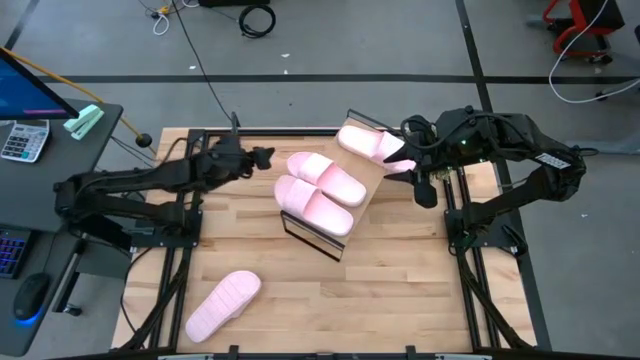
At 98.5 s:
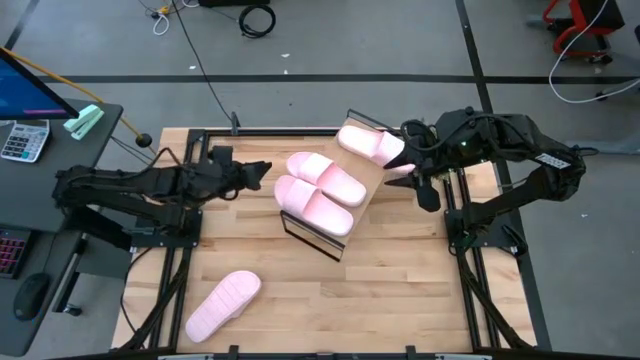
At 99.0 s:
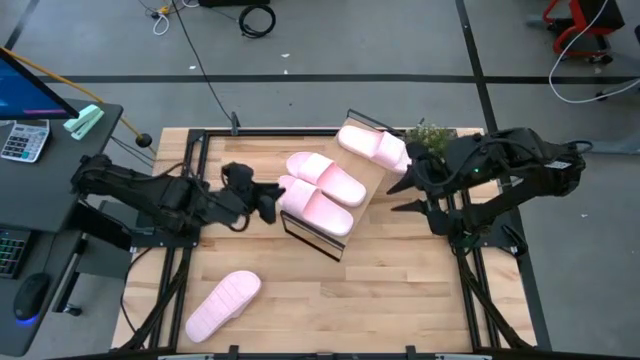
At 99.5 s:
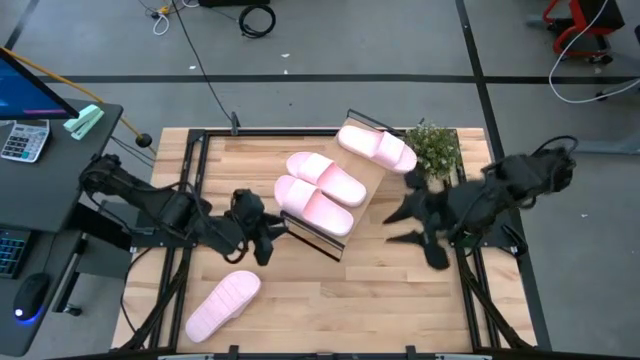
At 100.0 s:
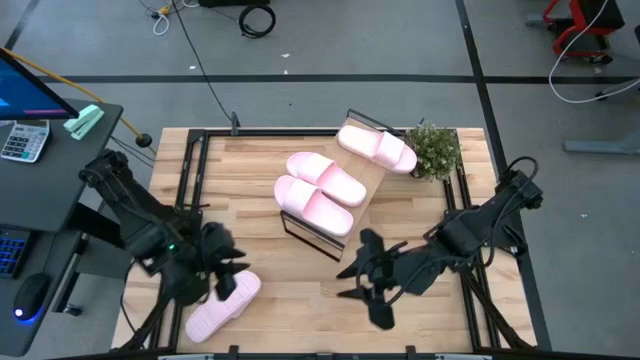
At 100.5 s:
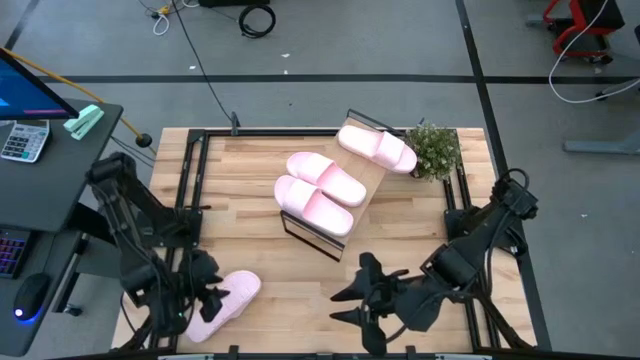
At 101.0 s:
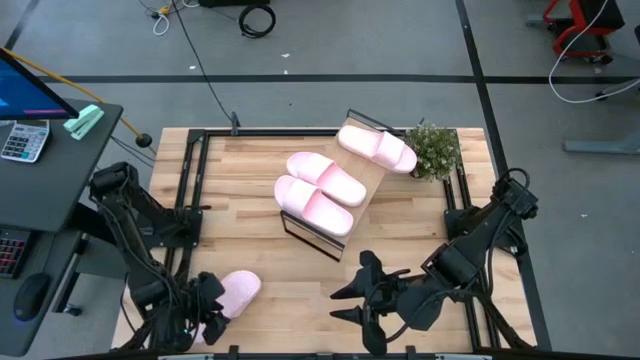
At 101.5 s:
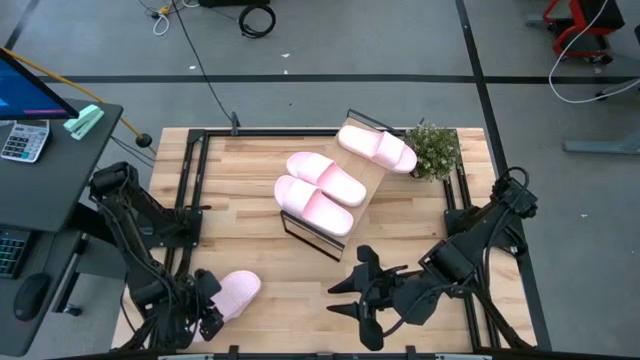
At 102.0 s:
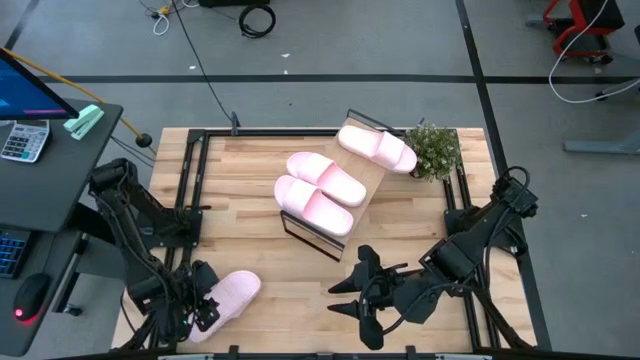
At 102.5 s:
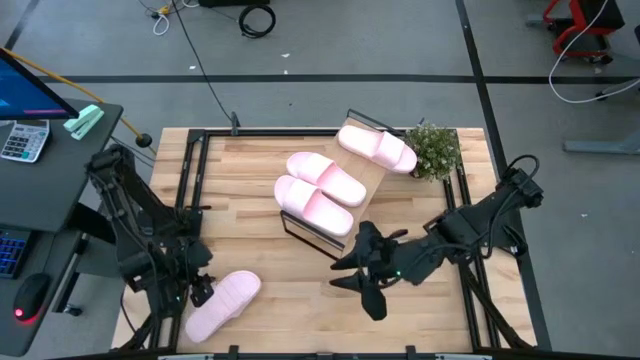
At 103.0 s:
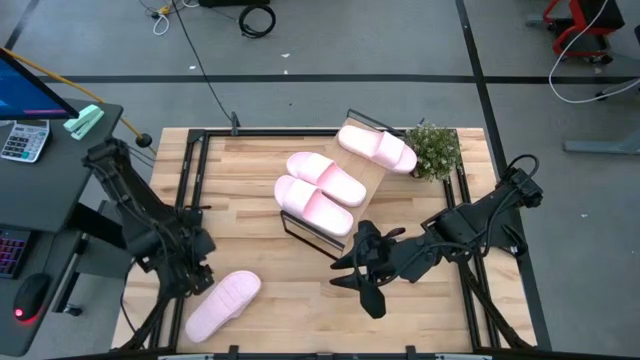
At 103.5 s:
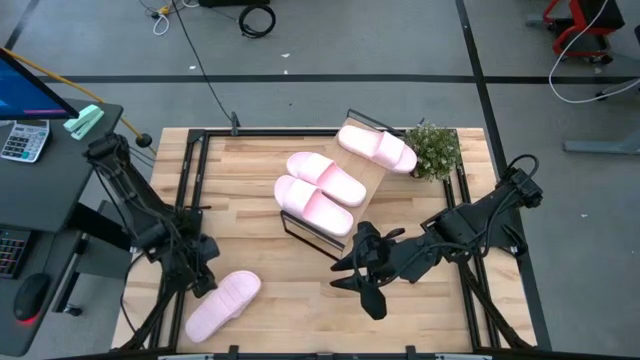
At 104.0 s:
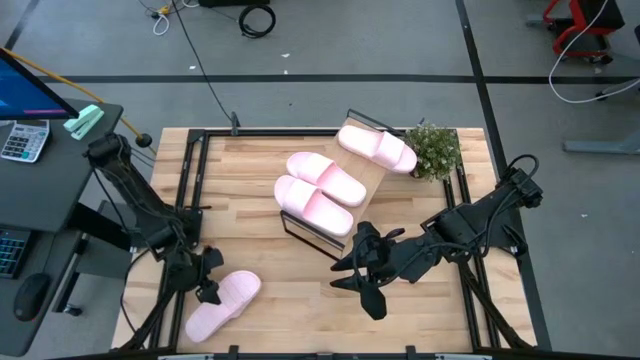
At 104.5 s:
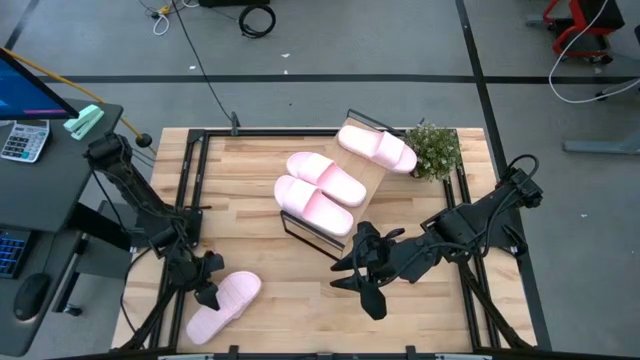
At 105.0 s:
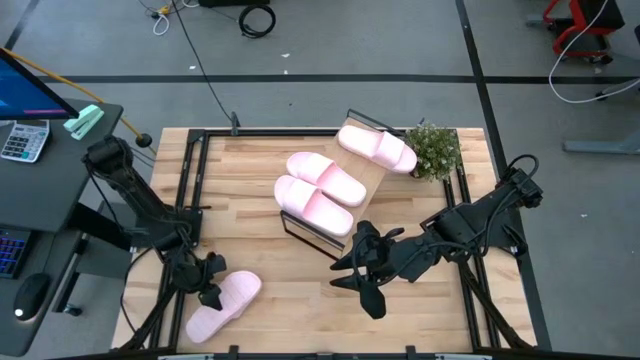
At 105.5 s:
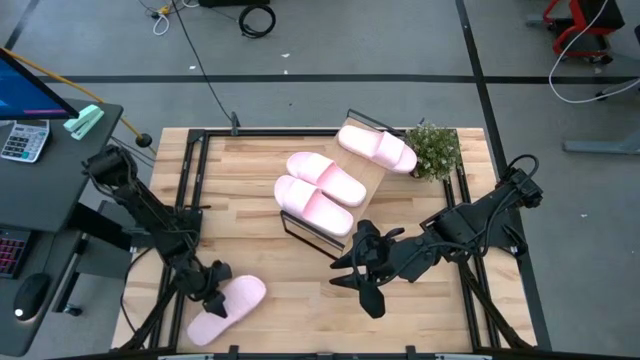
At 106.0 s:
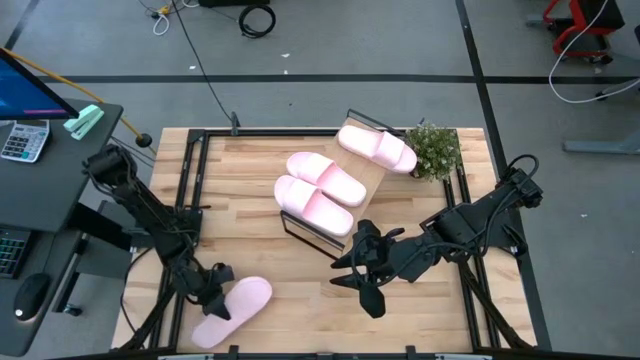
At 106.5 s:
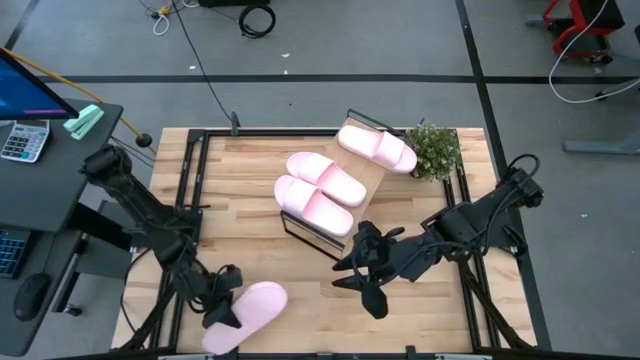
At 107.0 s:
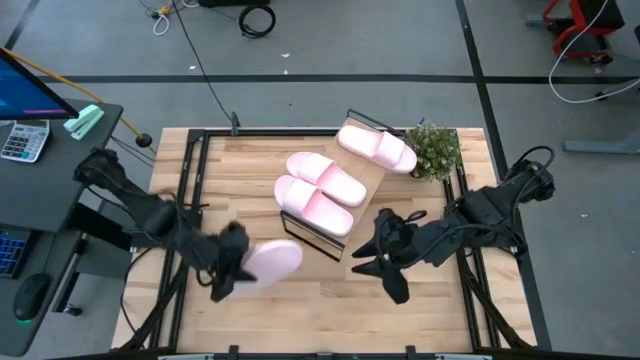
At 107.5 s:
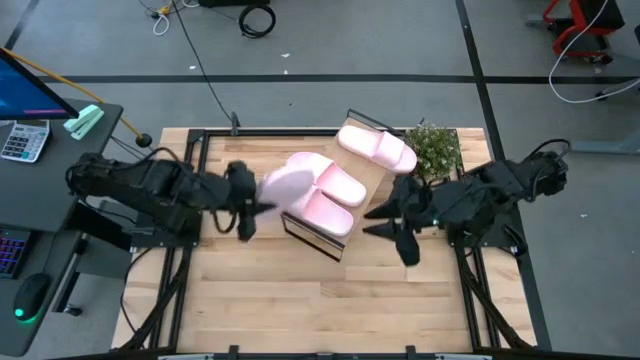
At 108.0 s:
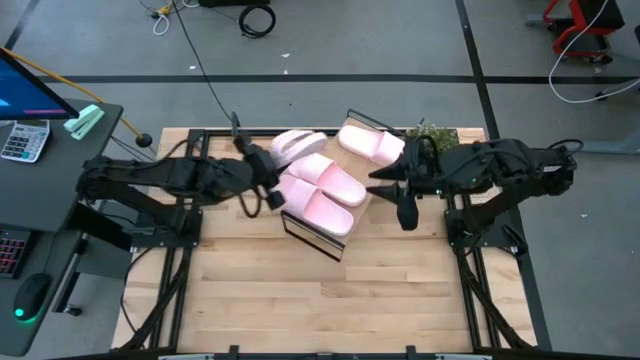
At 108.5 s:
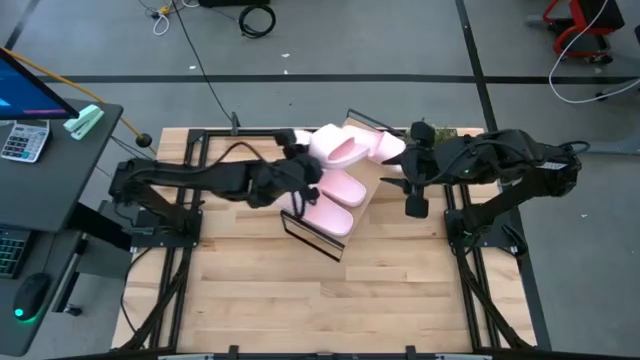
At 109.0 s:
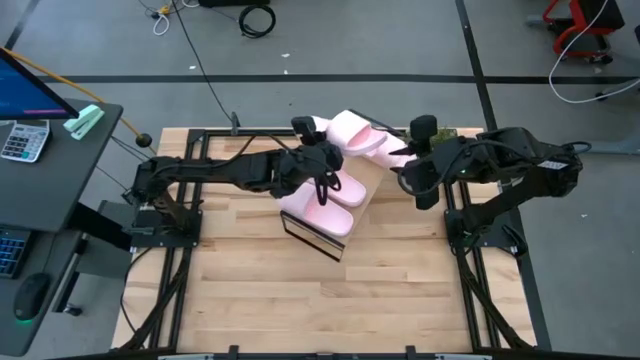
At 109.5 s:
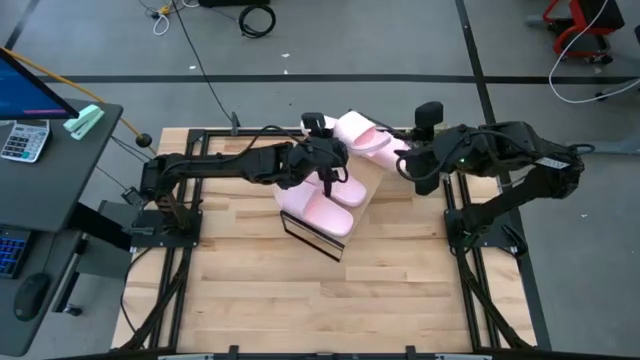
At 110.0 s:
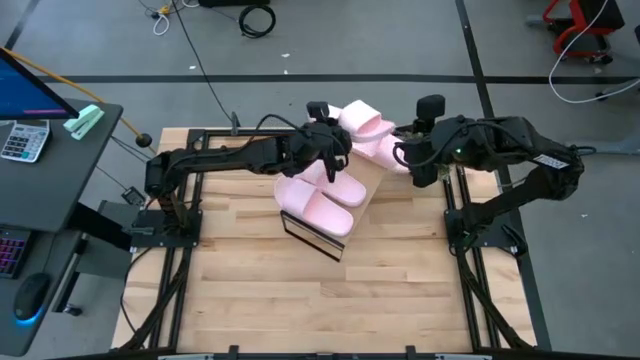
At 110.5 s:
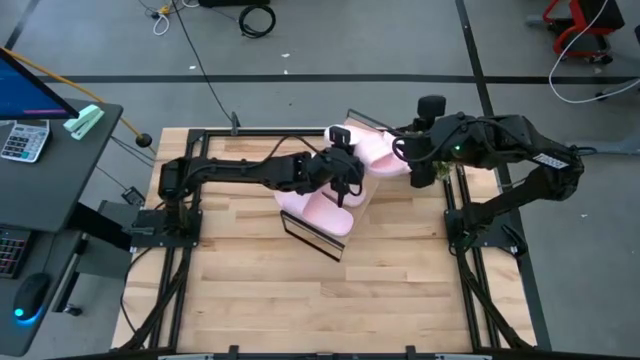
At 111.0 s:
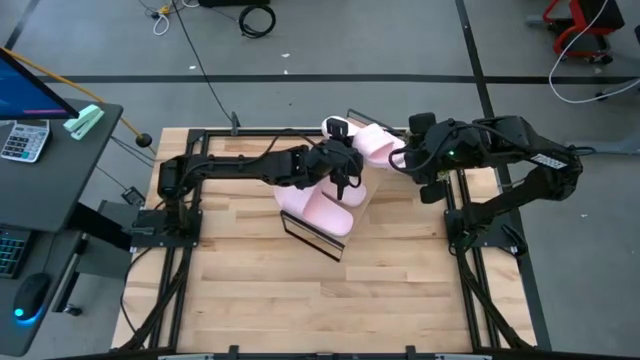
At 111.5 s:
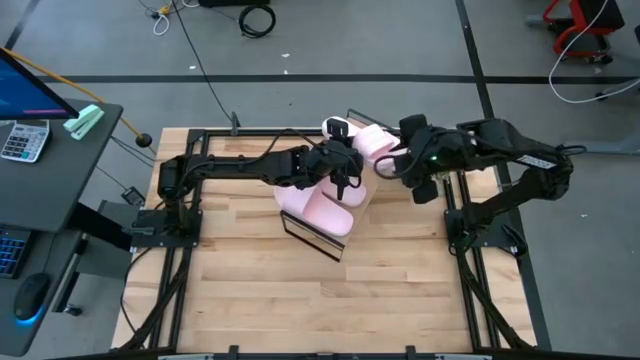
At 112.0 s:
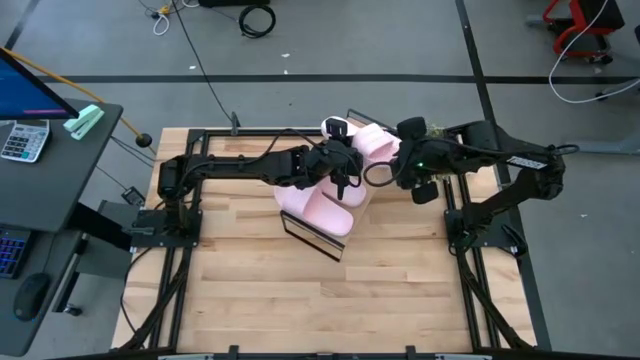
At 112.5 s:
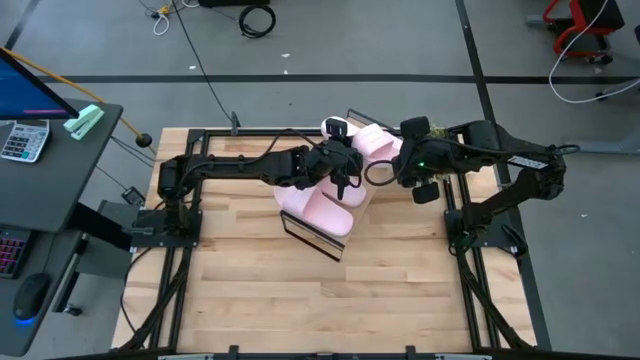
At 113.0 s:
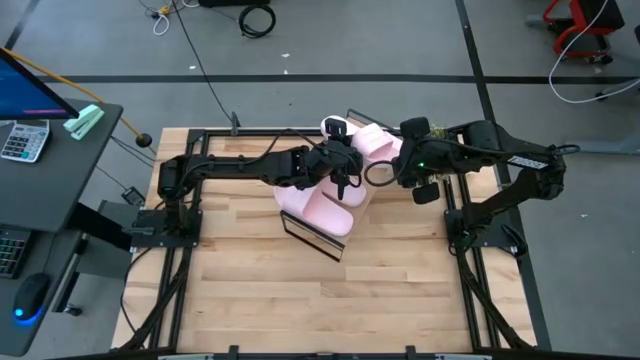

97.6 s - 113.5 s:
Task: Pick and place slides into the shelf
Put the pink slide on the shelf

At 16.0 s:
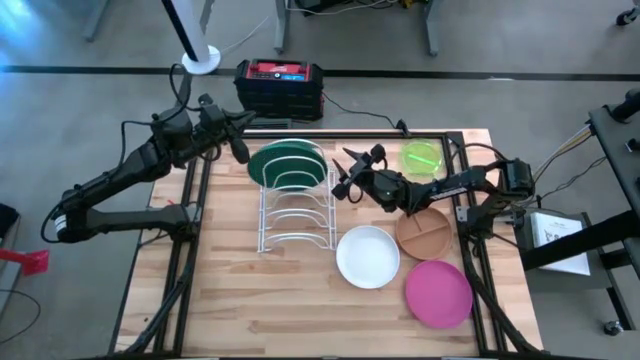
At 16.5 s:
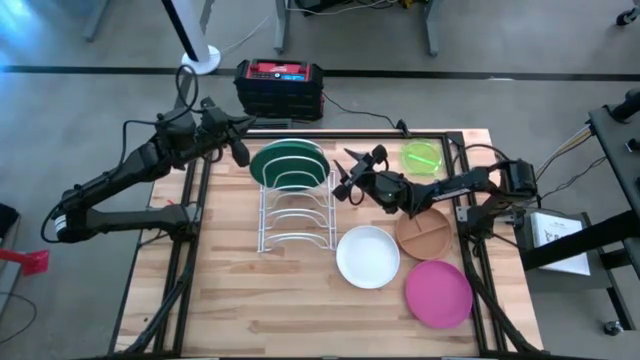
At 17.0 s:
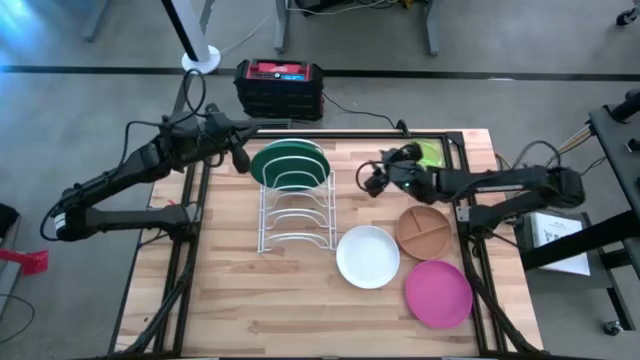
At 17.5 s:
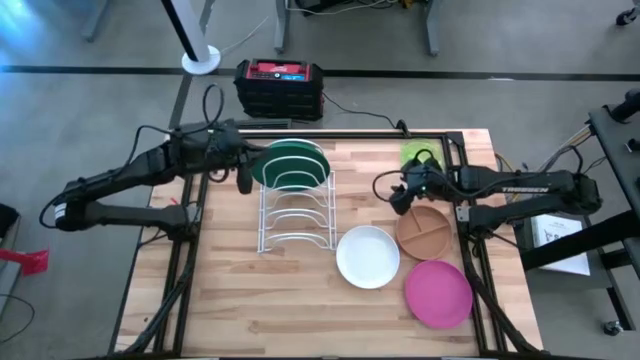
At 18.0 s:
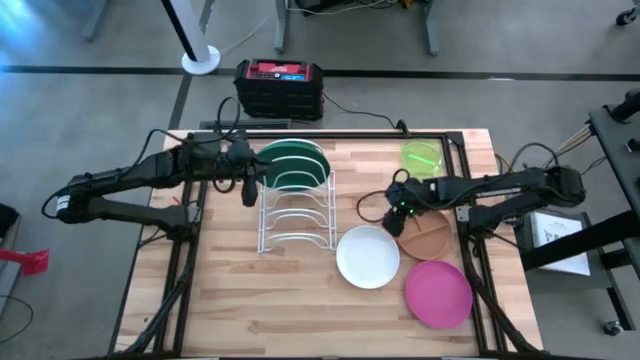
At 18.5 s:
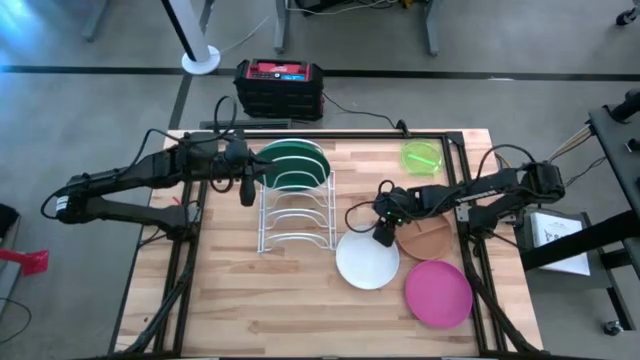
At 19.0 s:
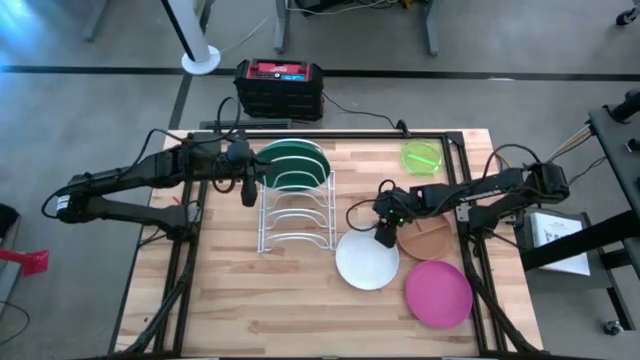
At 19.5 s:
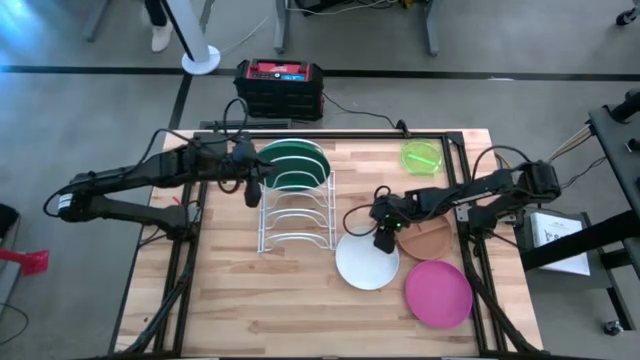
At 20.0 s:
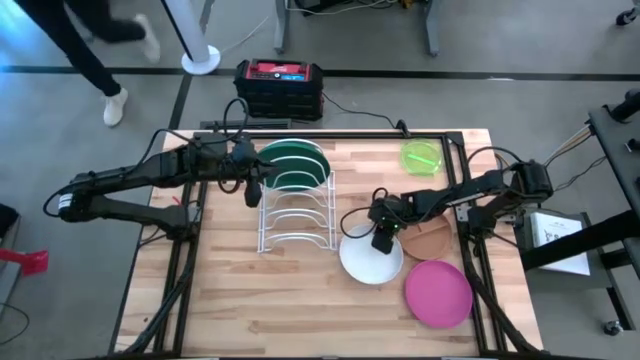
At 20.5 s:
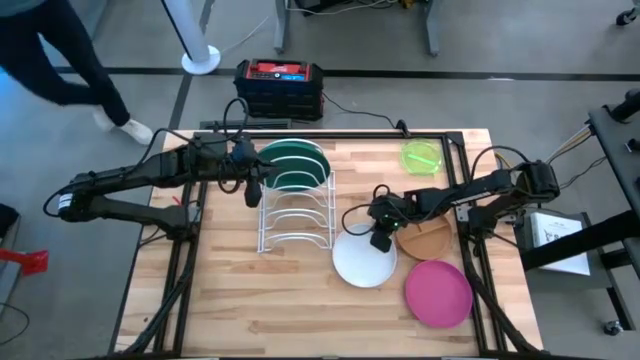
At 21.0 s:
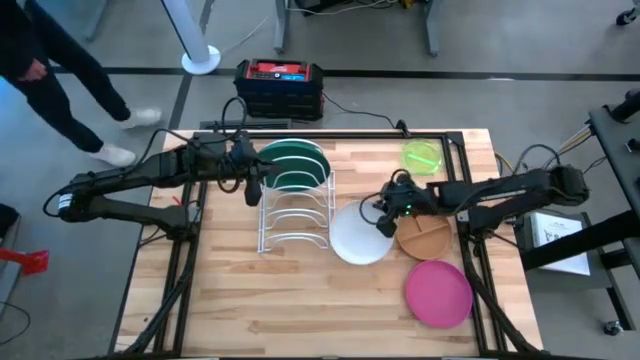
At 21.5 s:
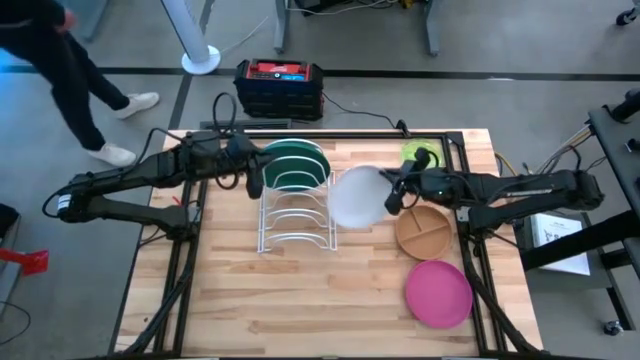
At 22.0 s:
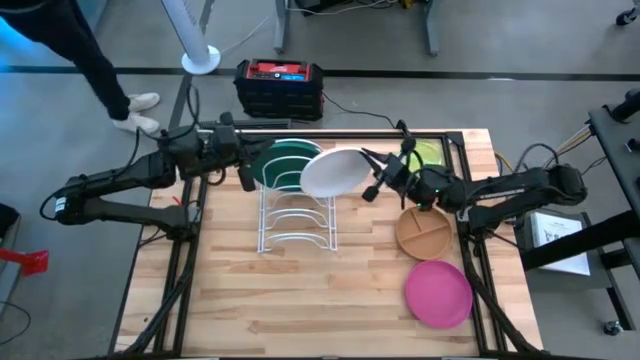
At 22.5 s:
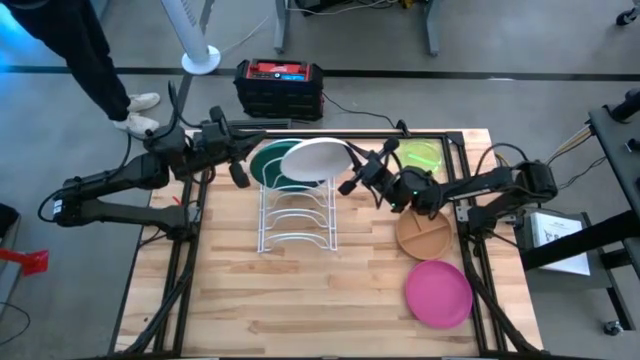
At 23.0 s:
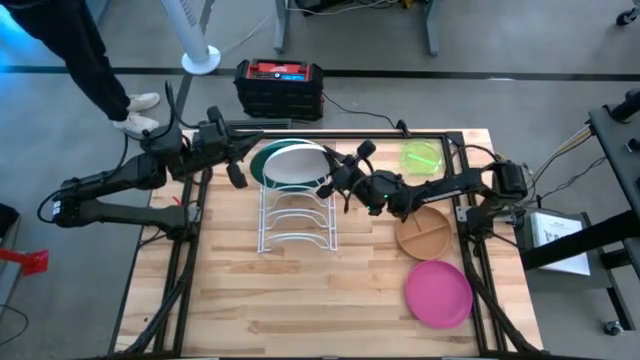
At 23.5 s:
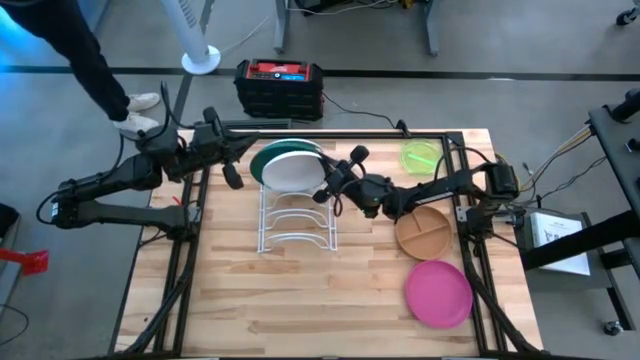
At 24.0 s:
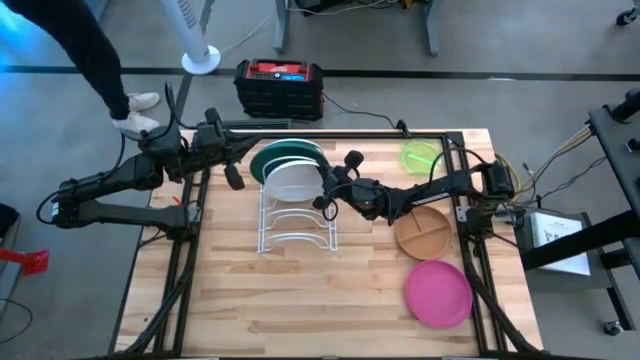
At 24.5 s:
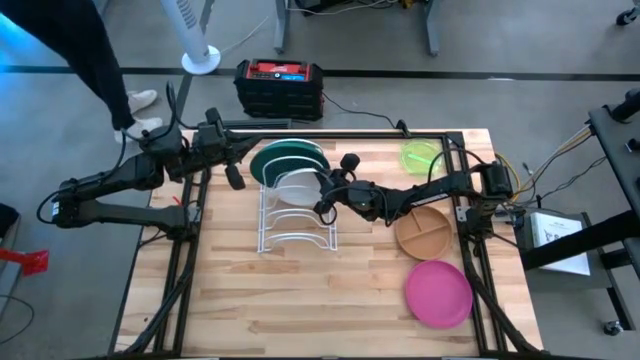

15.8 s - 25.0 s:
Task: Sort dishes
Put the white plate in the white dish rack
